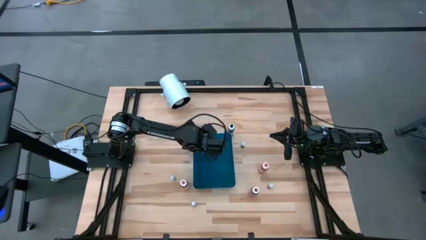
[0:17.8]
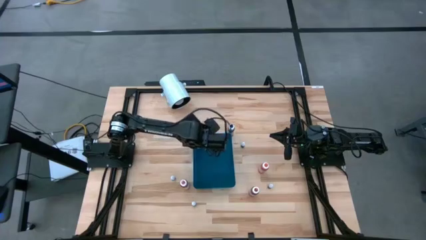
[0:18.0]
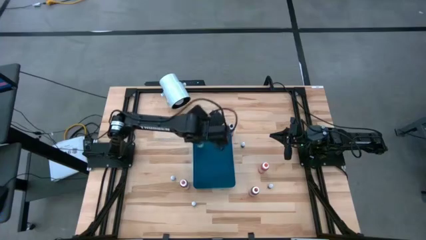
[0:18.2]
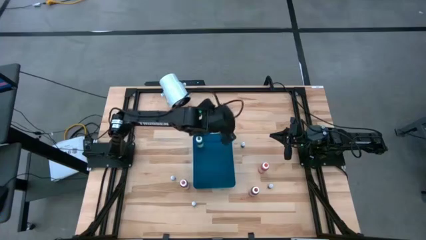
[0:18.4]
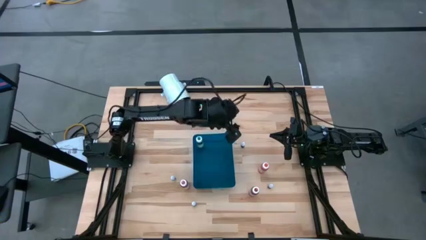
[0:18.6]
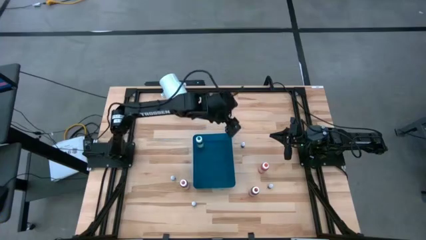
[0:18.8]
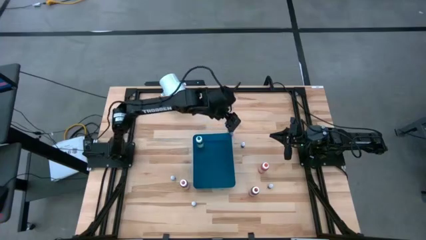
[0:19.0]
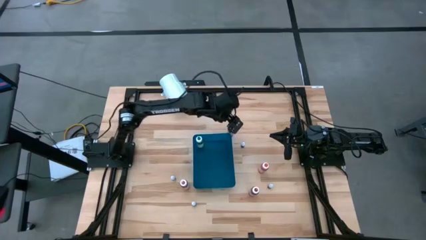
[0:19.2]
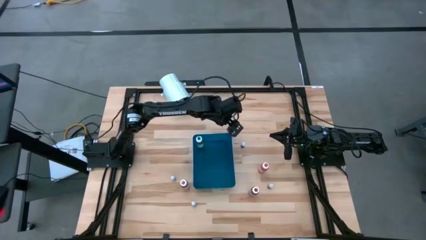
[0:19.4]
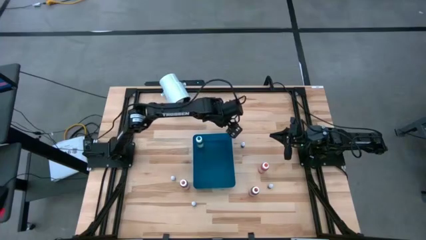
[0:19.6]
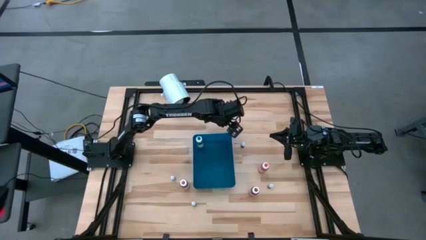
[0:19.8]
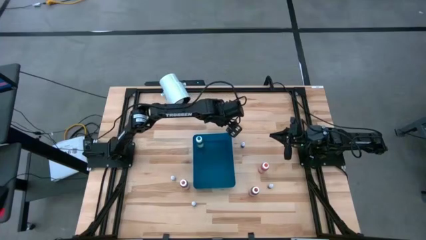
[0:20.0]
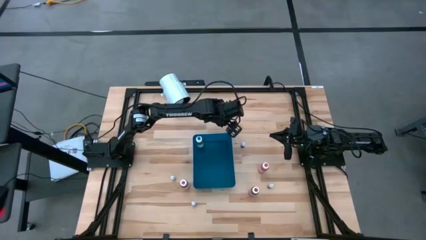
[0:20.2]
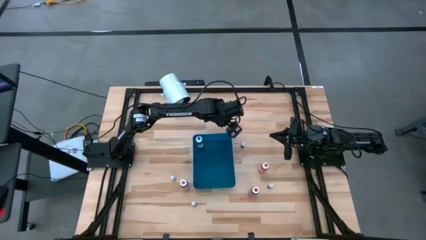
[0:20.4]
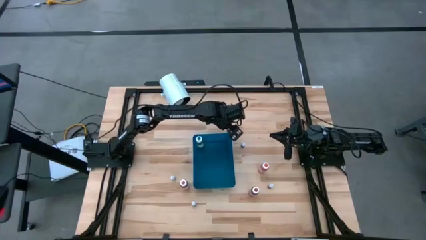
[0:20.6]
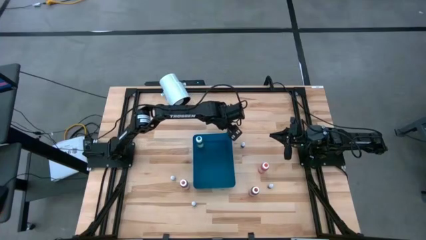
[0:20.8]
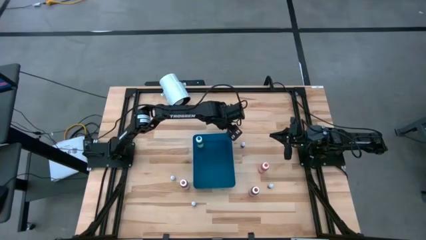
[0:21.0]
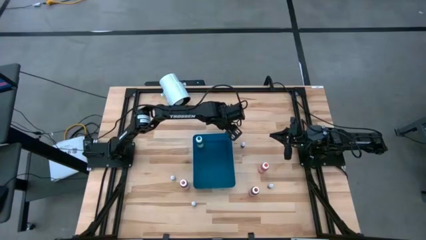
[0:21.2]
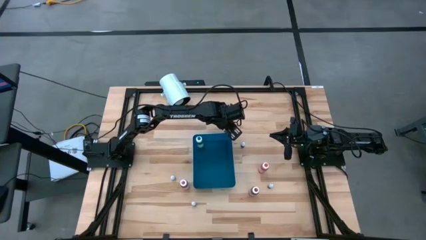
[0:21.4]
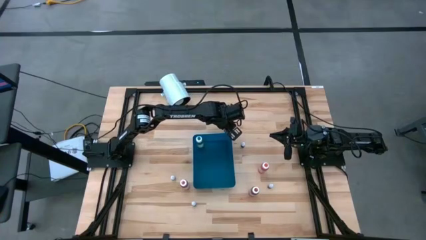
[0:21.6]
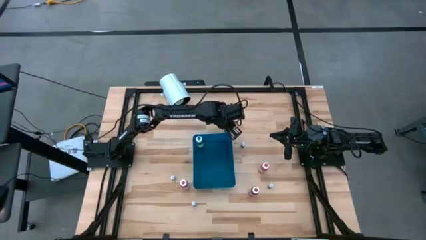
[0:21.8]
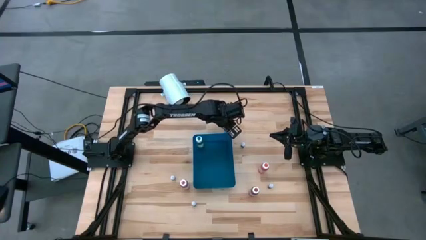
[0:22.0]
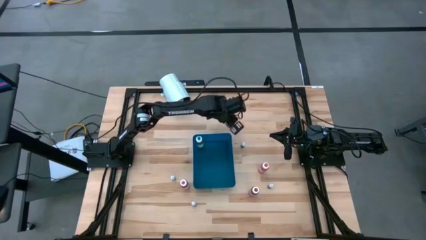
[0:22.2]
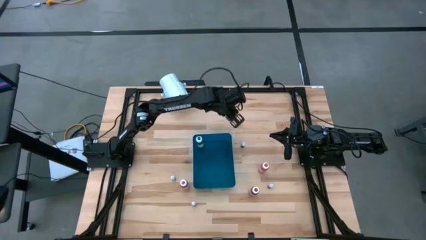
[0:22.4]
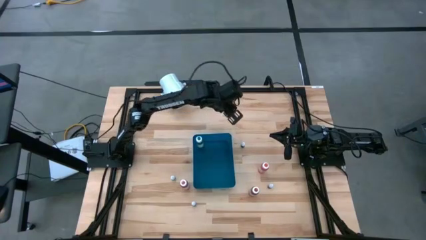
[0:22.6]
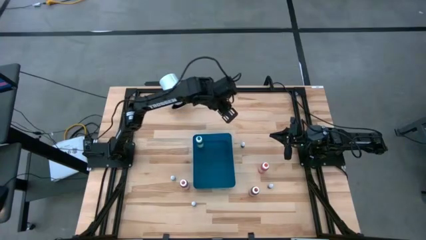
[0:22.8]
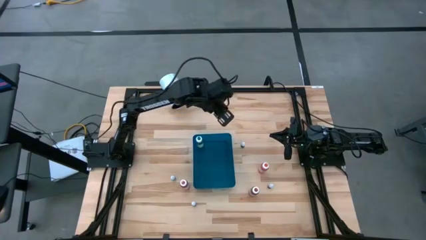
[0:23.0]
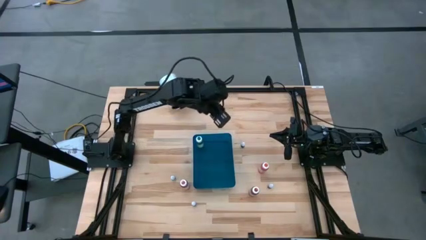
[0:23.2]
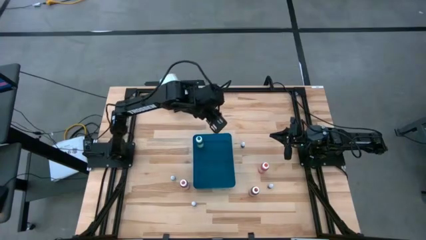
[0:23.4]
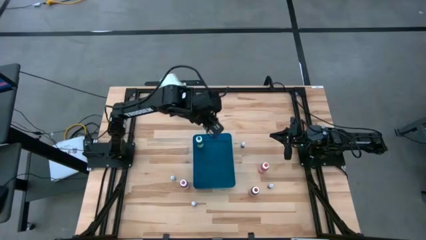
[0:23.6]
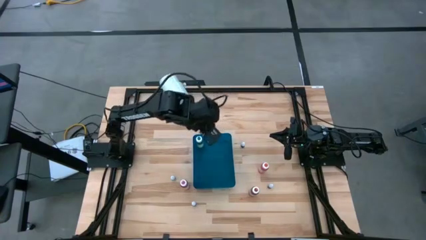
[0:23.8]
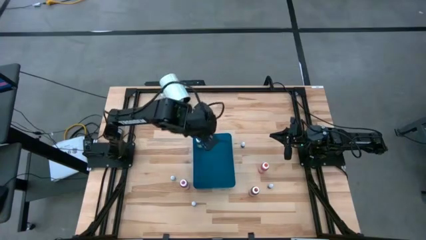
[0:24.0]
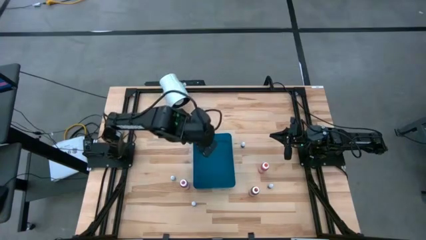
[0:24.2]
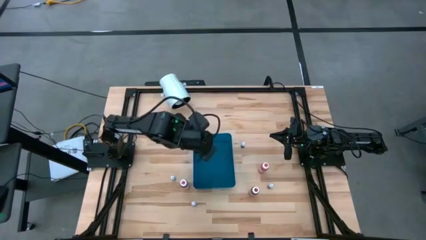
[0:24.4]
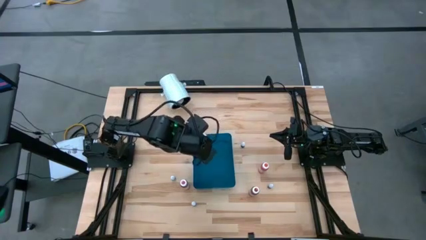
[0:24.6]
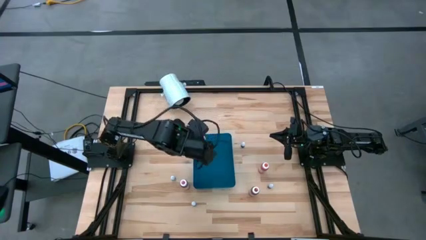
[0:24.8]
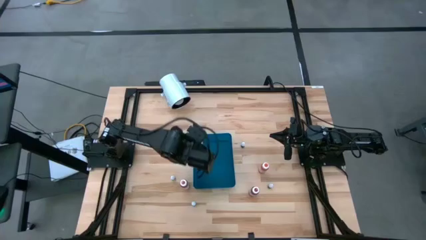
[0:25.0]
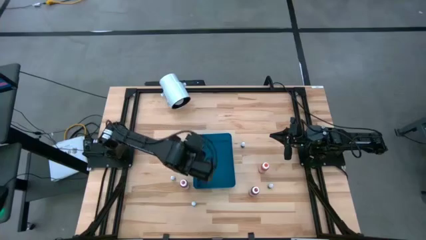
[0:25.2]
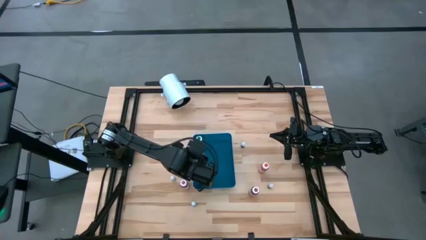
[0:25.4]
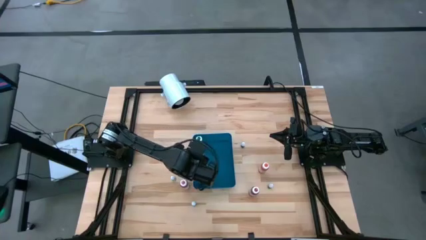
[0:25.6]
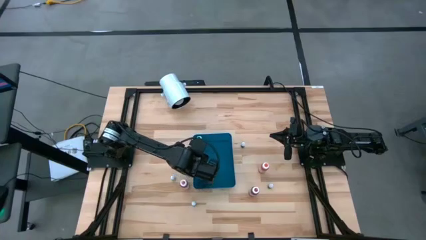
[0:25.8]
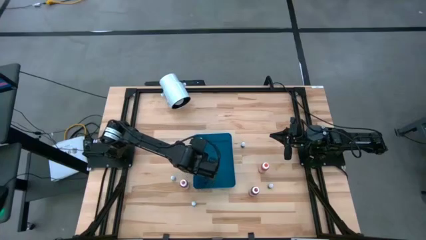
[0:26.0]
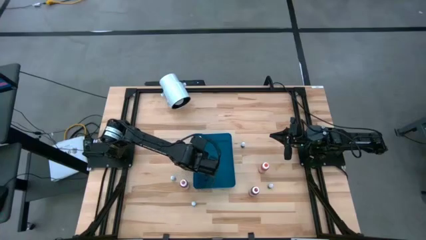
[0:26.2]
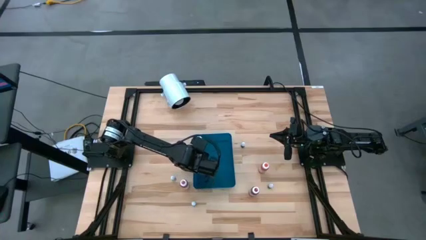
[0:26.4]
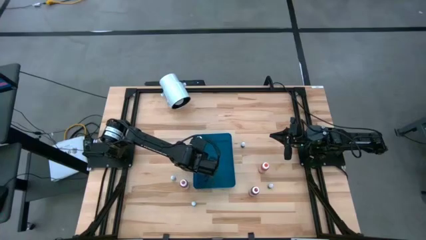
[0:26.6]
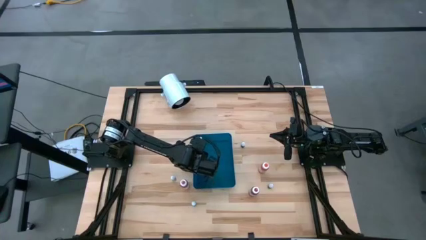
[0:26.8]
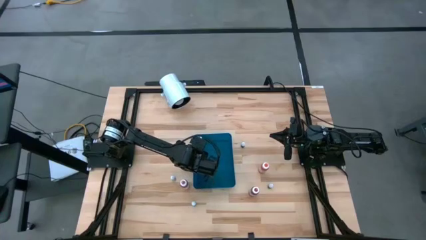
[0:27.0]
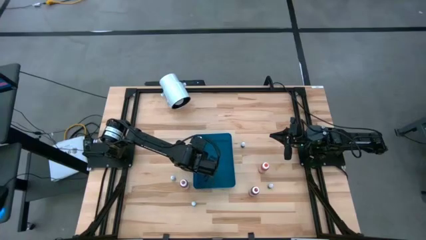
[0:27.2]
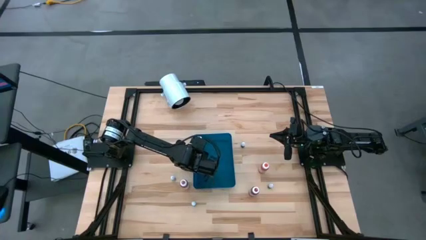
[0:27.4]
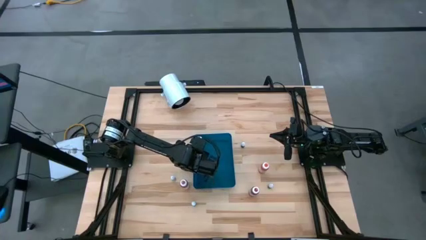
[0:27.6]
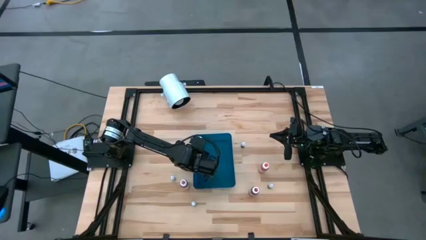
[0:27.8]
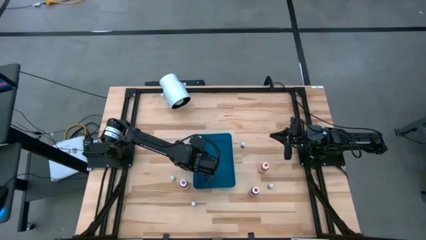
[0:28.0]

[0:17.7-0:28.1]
Task: Pick & Place food coloring
Put the large black food coloring bottle into the blue bin
